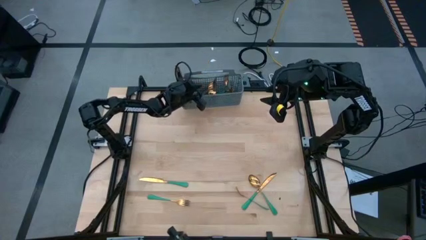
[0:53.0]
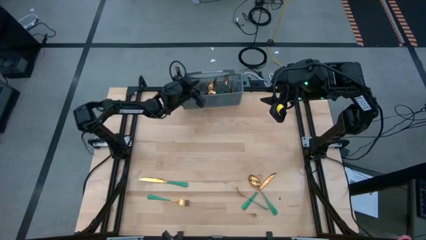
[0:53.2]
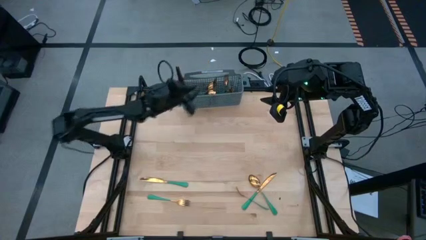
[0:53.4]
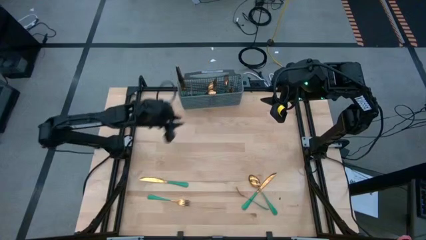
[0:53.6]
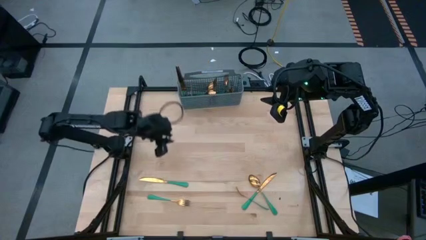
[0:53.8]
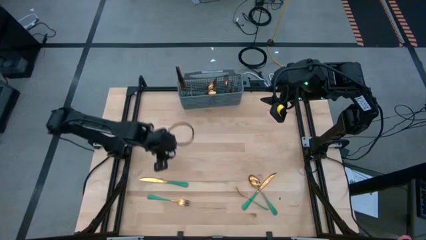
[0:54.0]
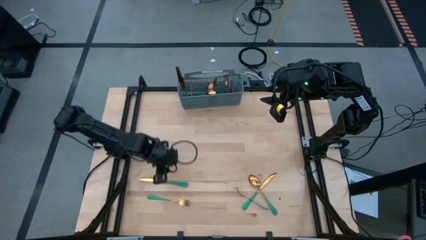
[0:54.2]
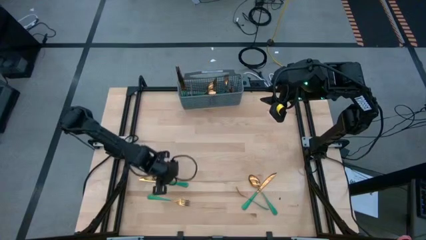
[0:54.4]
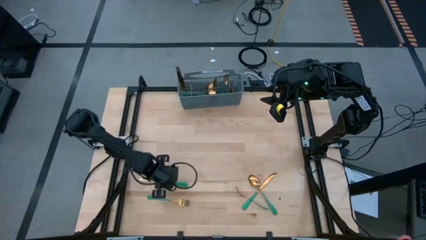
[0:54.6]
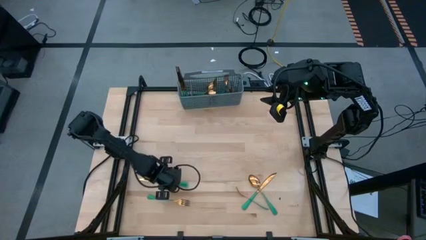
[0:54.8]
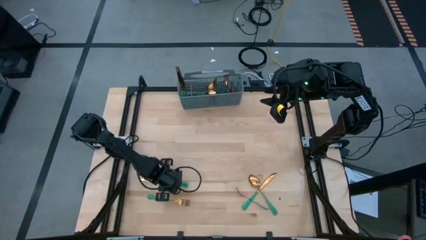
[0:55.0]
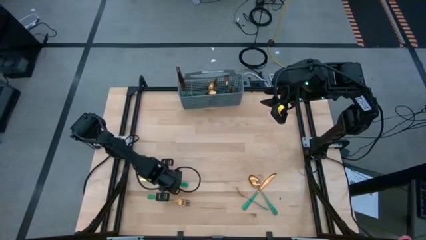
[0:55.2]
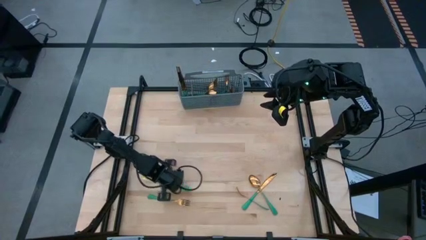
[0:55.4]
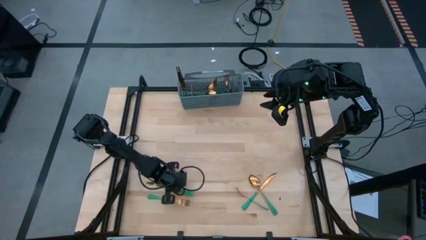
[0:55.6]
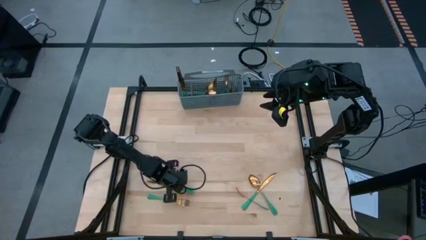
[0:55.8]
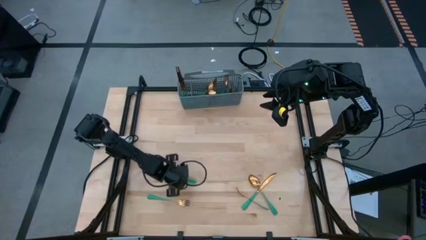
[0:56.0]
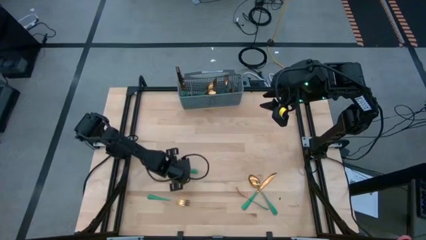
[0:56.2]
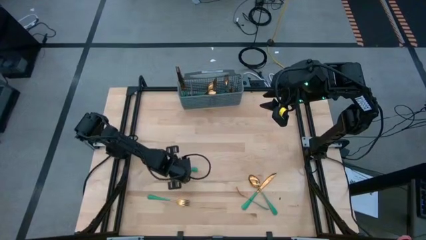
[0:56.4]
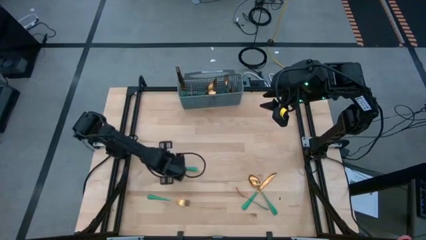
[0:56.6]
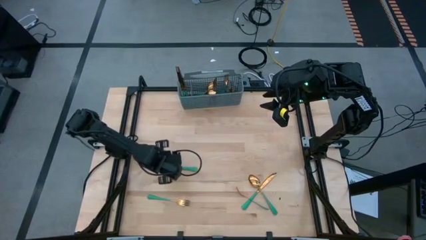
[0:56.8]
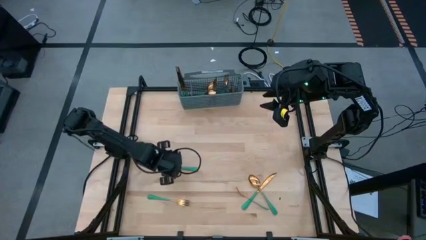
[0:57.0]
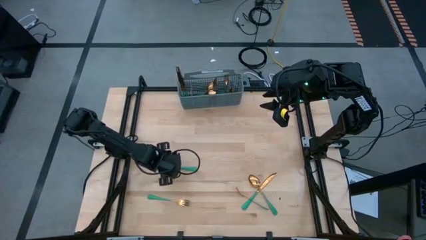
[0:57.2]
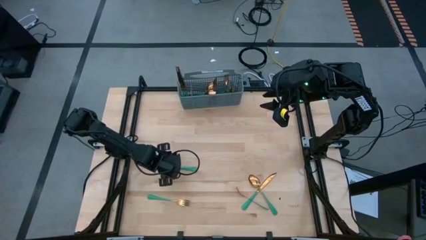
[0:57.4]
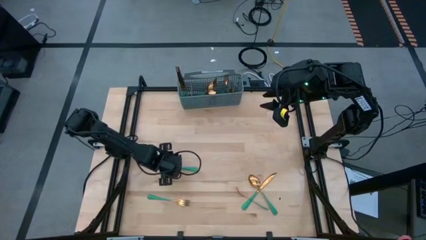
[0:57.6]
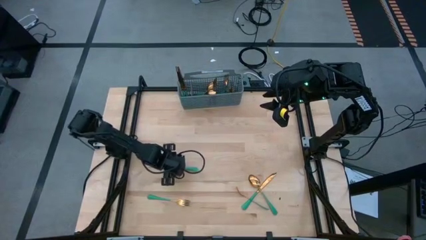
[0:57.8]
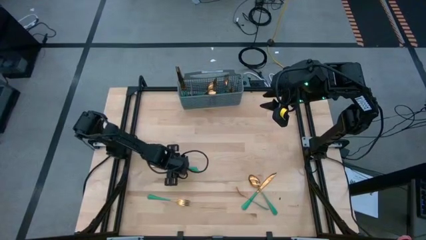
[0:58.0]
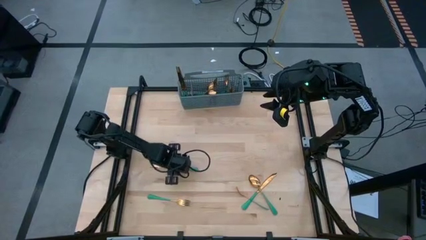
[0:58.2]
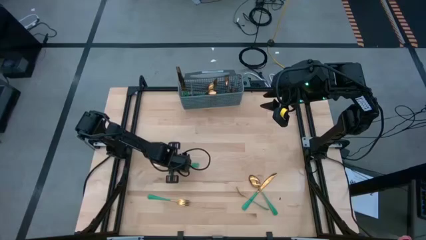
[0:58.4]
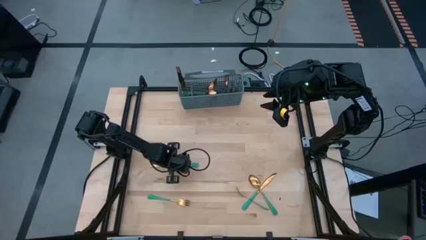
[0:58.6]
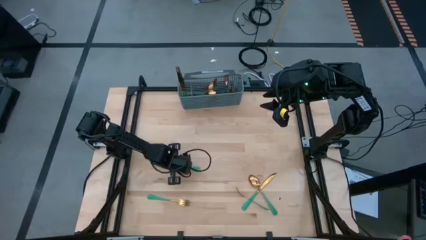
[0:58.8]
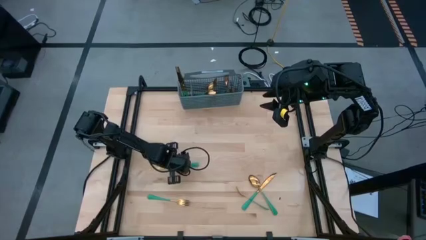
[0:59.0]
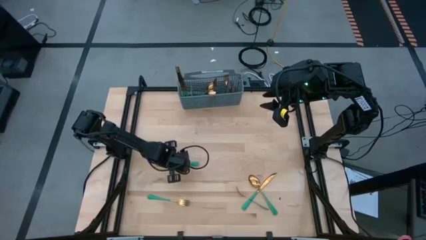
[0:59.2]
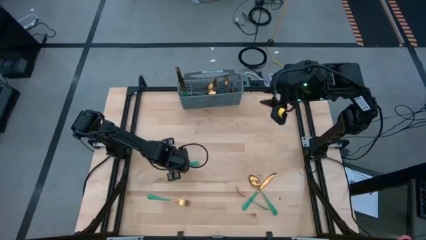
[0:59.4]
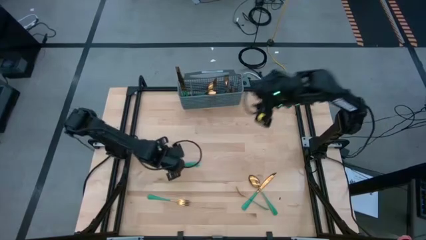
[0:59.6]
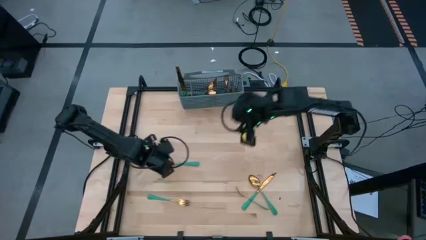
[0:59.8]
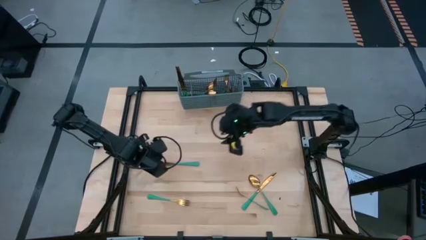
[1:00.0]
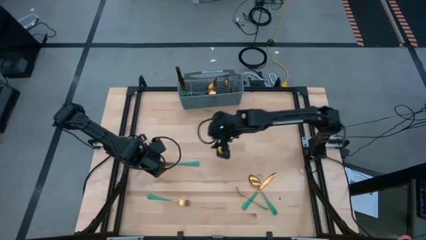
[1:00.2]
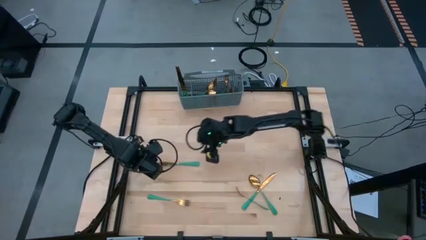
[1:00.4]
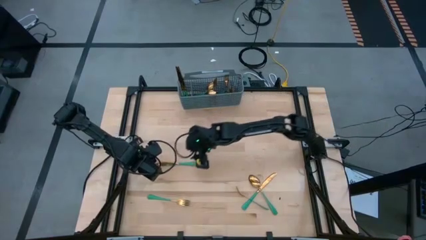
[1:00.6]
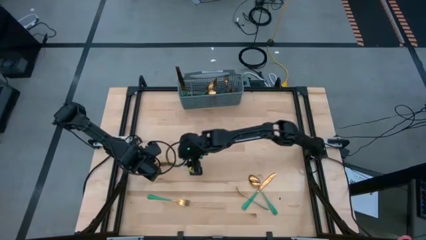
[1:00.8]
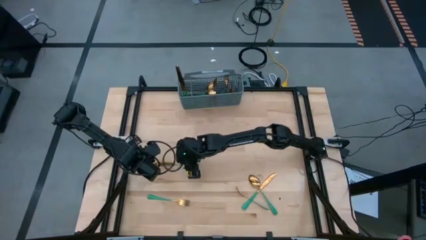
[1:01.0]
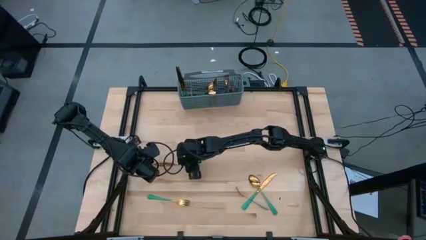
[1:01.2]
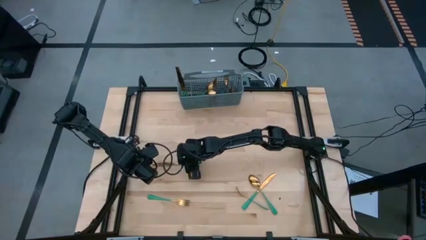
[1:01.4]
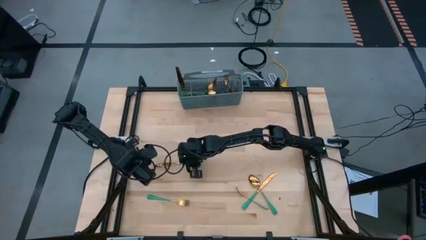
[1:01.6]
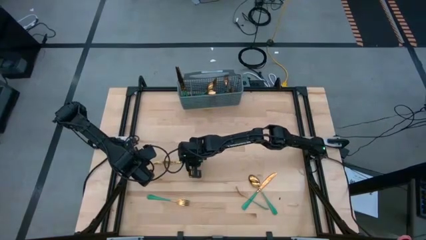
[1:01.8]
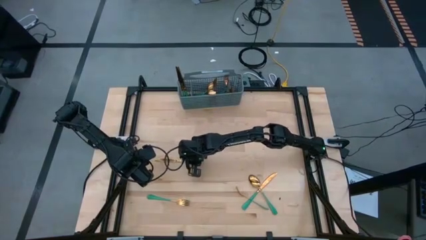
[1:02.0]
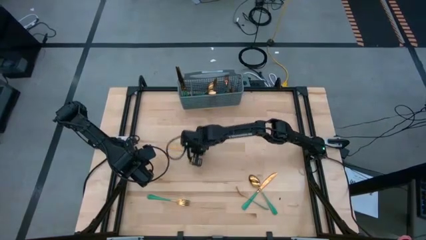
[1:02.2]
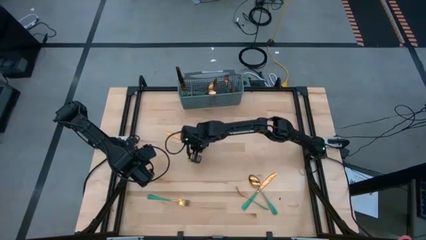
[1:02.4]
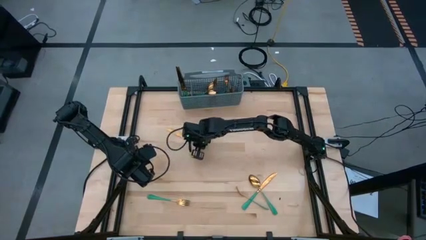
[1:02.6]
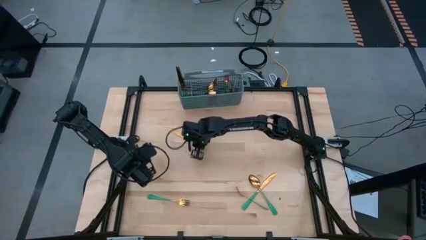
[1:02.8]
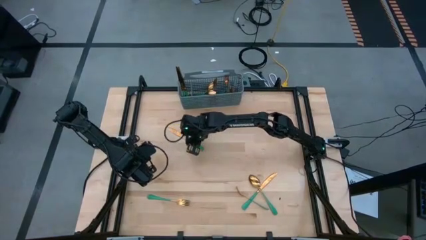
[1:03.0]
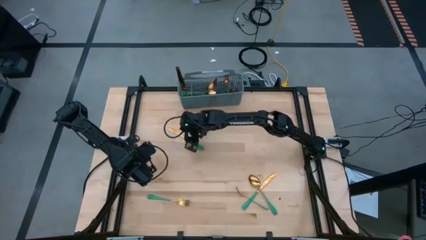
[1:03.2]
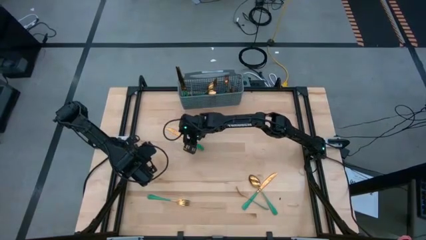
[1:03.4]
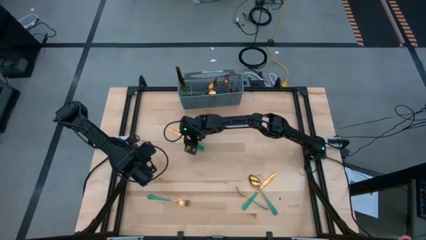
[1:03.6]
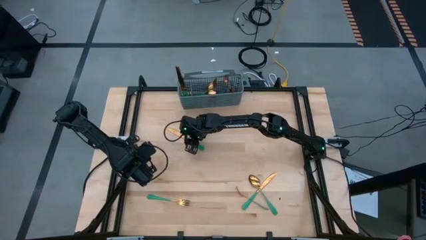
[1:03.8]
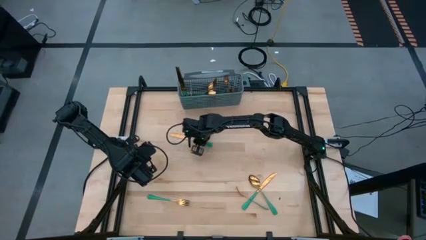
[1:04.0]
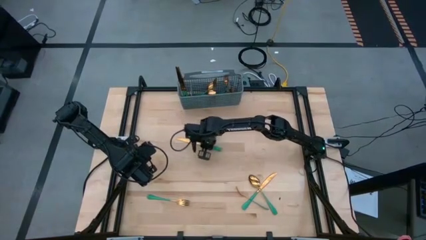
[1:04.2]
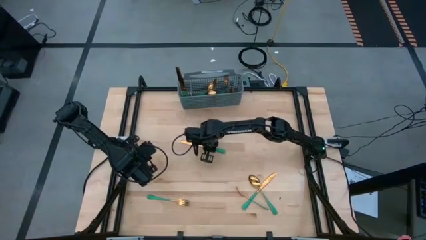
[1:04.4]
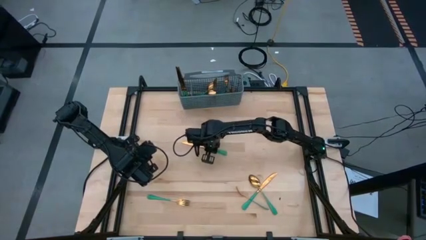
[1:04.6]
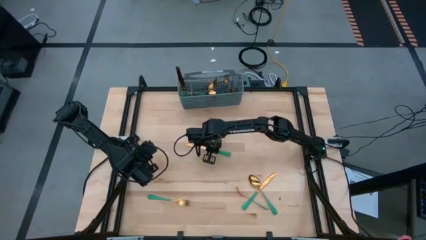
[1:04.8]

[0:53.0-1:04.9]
Task: Sort silverware
Put the green knife into the gray bin

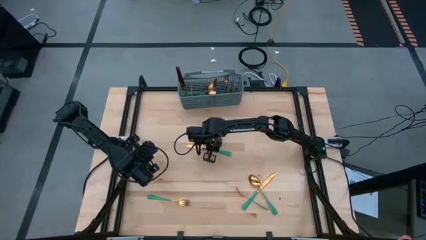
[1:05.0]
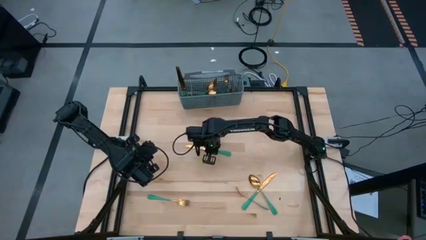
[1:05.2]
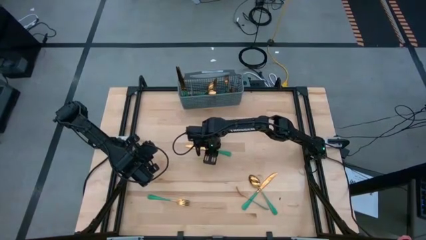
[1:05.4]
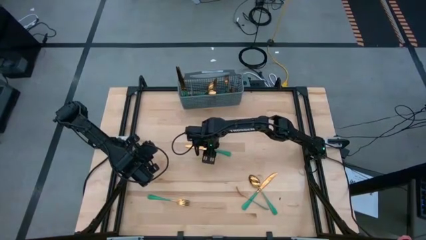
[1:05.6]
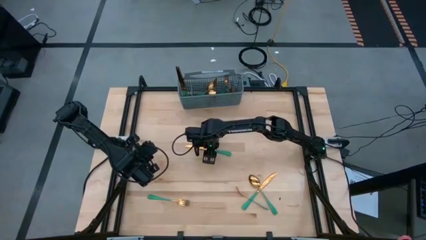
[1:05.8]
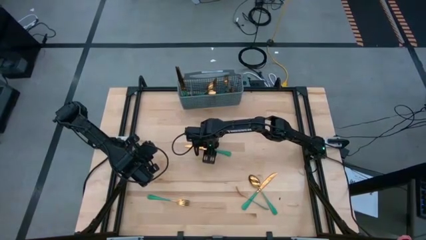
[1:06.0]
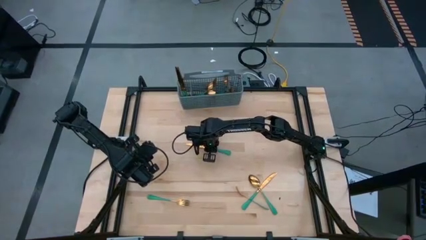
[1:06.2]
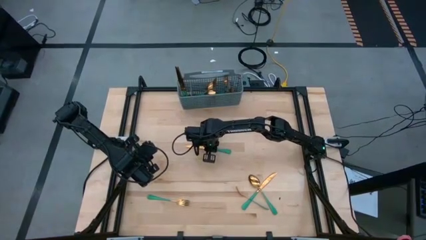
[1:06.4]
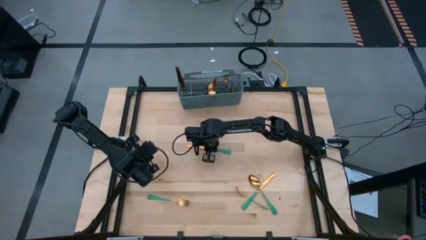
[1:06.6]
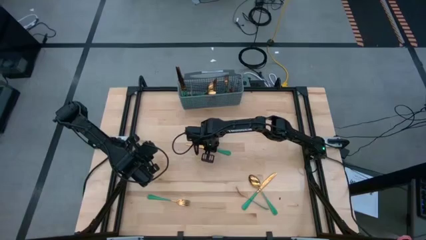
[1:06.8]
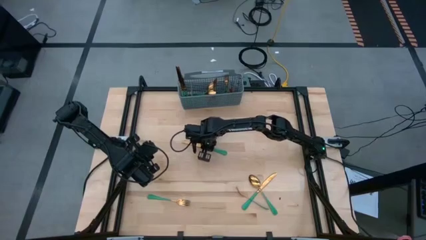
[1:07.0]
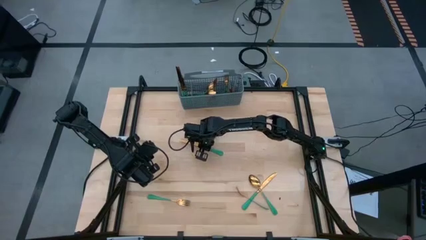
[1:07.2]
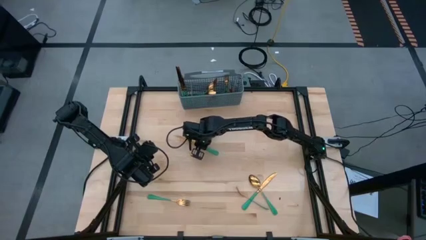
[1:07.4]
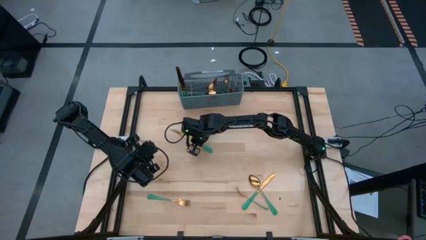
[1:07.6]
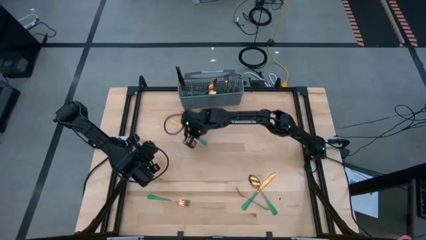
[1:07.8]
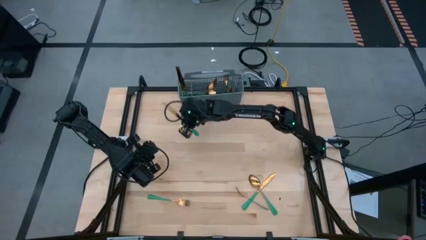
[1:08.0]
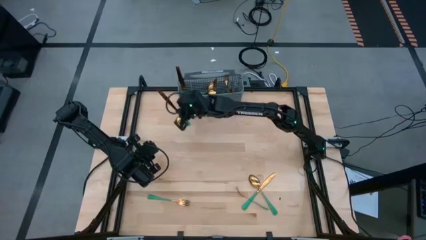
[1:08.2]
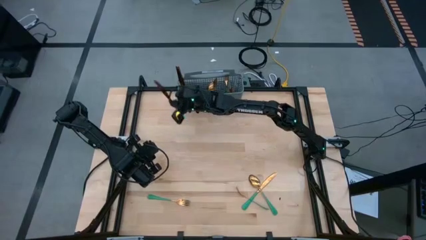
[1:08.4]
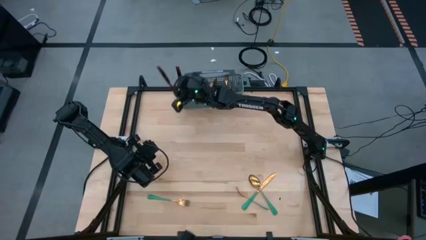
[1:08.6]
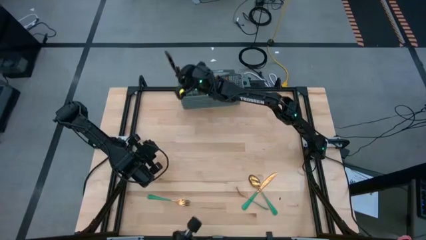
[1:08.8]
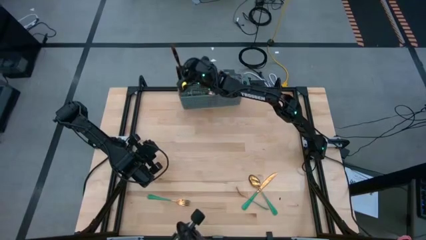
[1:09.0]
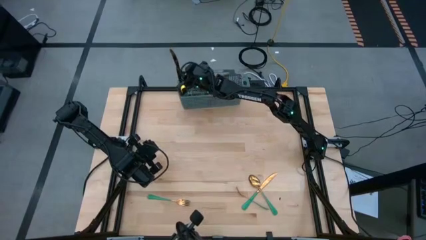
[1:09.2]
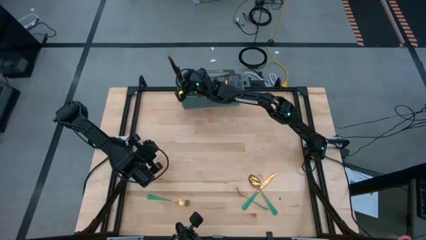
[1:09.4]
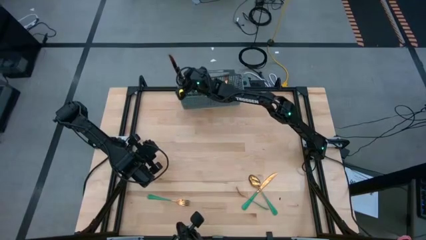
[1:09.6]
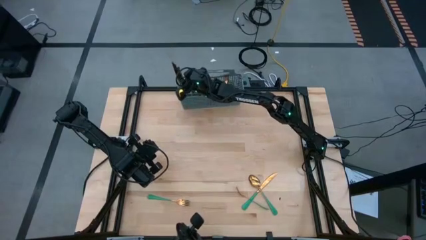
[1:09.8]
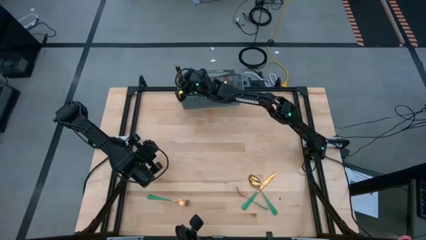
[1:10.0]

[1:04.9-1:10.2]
Put the green knife into the gray bin
